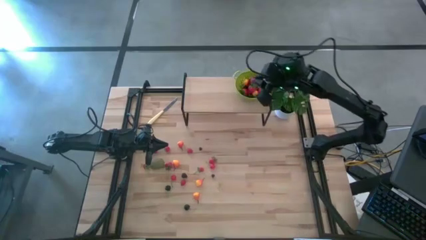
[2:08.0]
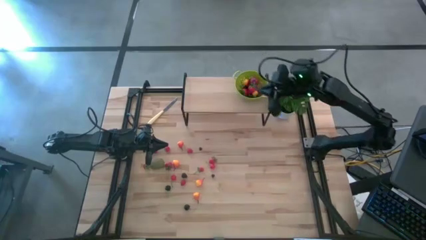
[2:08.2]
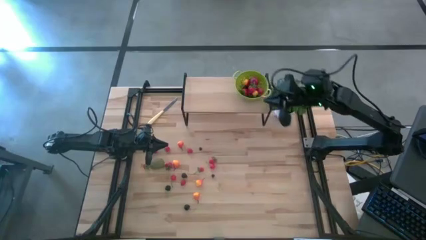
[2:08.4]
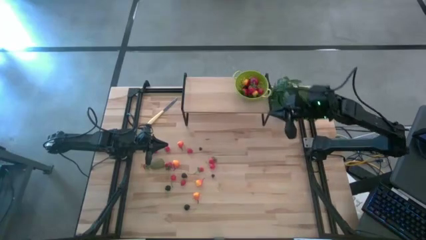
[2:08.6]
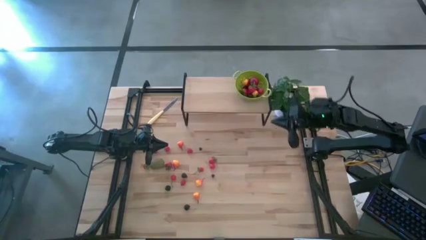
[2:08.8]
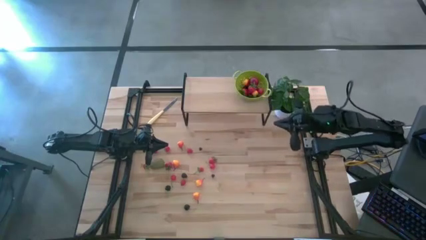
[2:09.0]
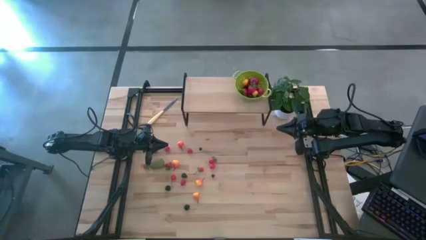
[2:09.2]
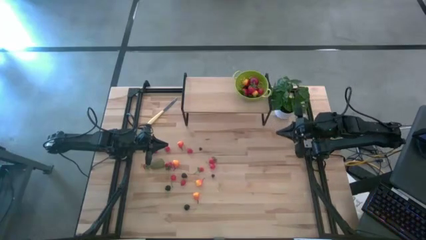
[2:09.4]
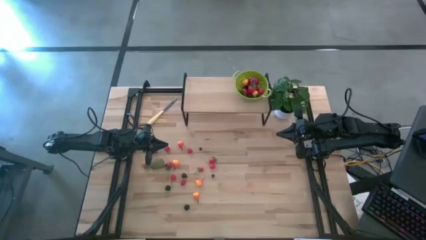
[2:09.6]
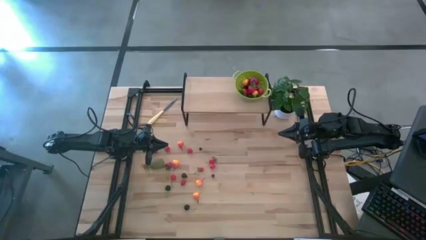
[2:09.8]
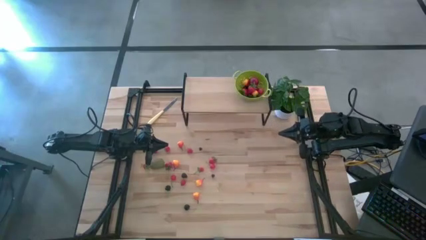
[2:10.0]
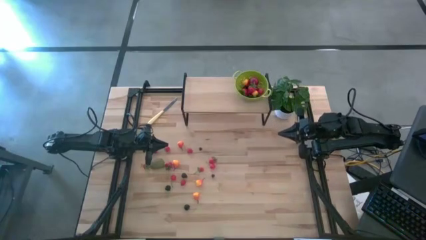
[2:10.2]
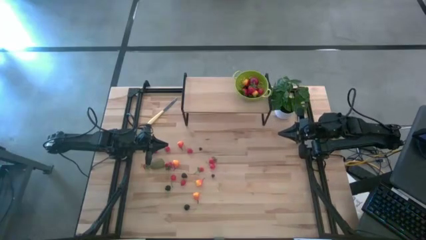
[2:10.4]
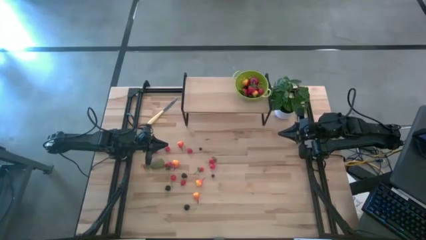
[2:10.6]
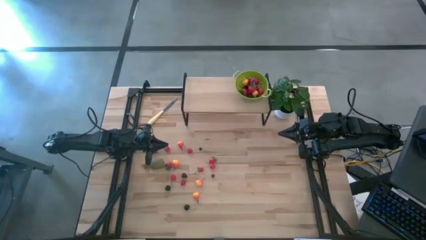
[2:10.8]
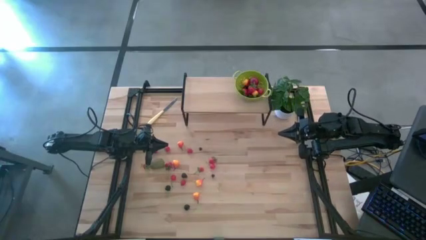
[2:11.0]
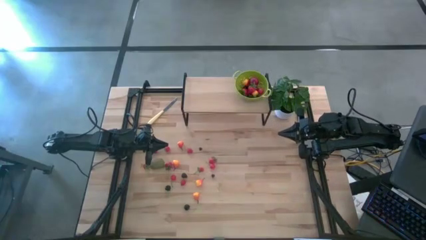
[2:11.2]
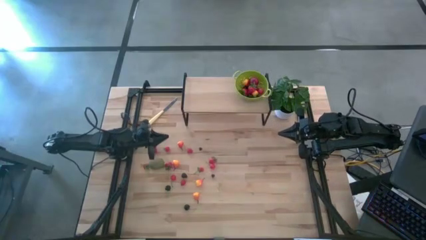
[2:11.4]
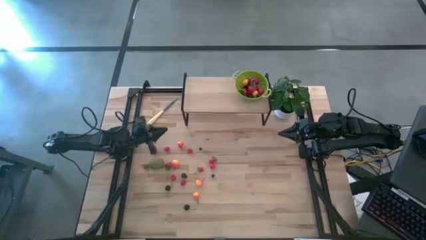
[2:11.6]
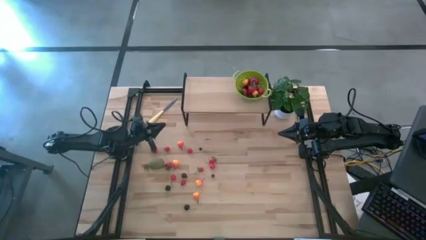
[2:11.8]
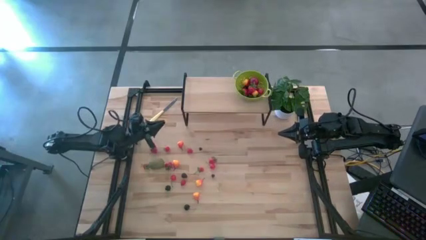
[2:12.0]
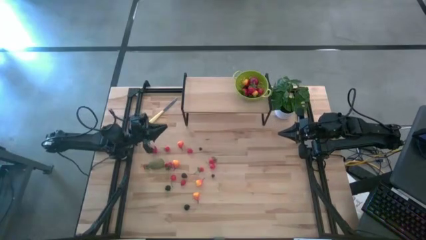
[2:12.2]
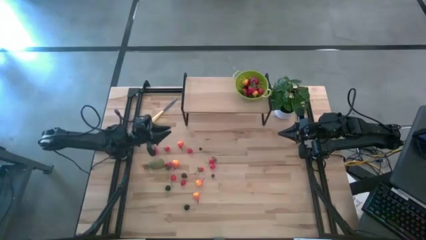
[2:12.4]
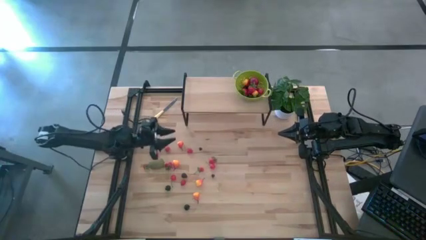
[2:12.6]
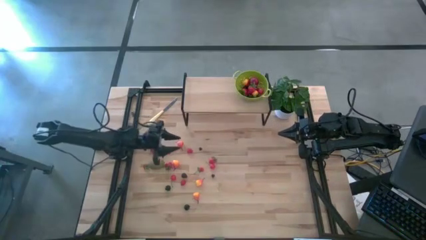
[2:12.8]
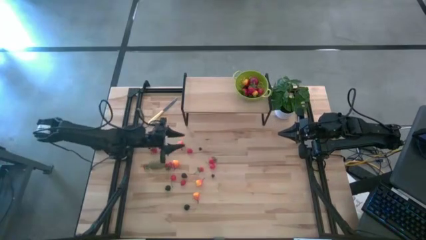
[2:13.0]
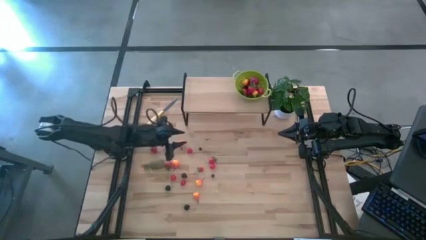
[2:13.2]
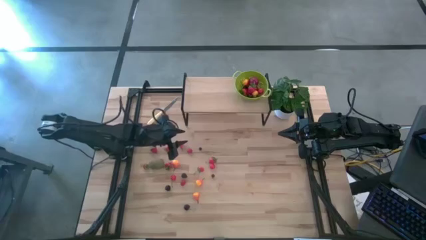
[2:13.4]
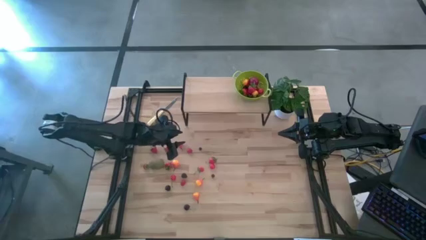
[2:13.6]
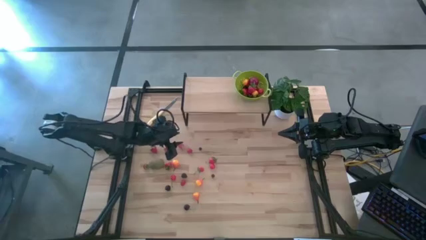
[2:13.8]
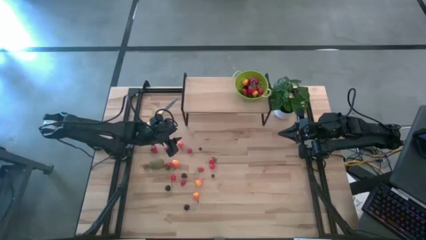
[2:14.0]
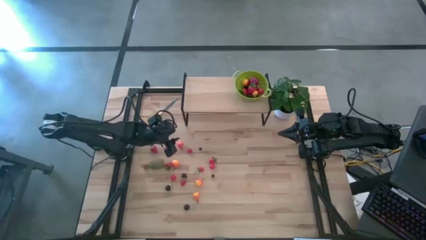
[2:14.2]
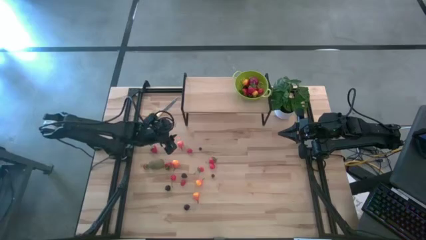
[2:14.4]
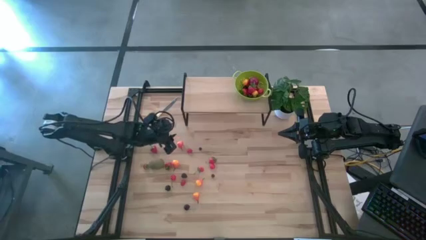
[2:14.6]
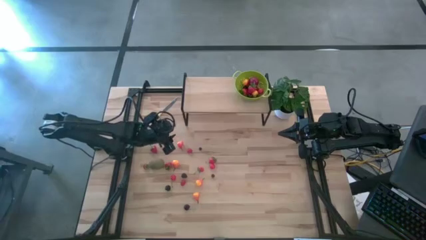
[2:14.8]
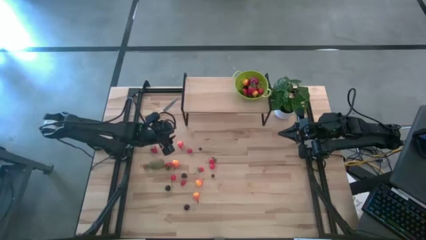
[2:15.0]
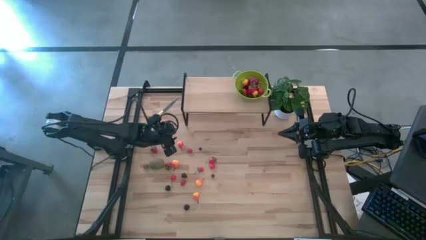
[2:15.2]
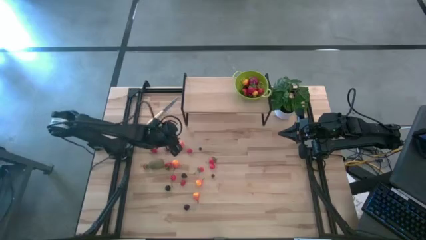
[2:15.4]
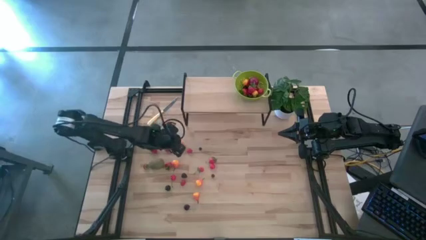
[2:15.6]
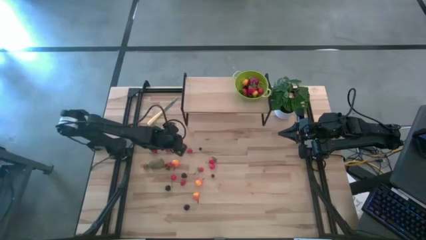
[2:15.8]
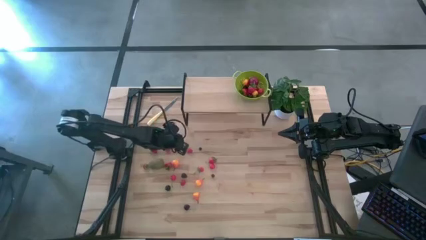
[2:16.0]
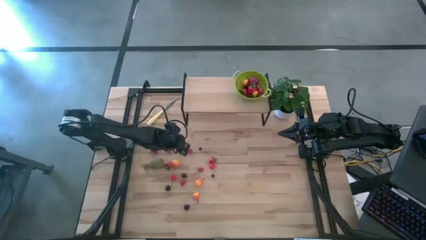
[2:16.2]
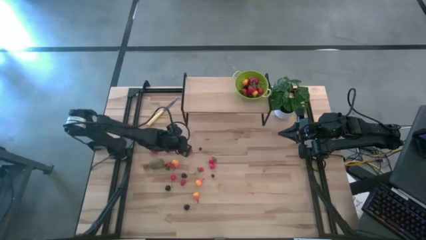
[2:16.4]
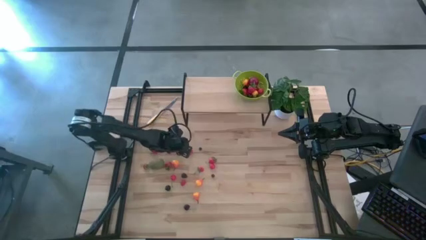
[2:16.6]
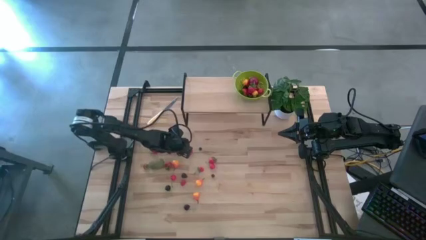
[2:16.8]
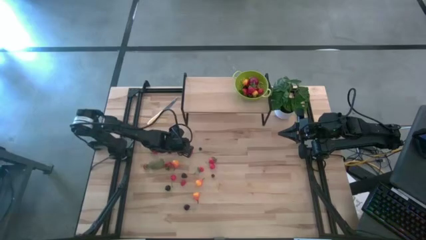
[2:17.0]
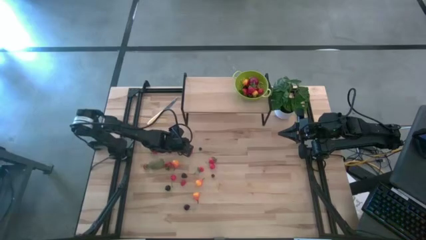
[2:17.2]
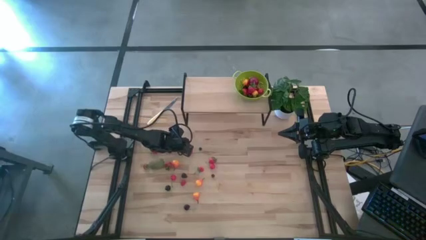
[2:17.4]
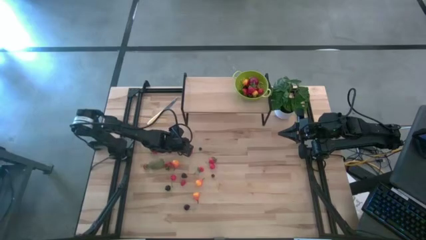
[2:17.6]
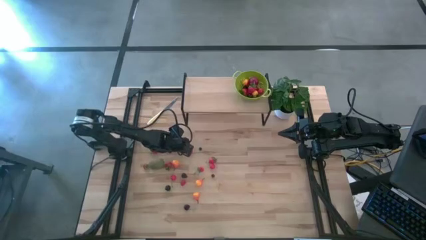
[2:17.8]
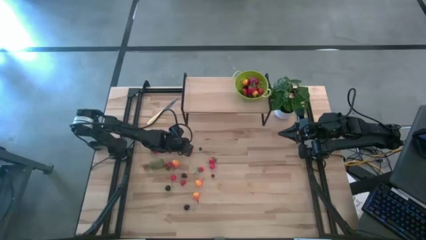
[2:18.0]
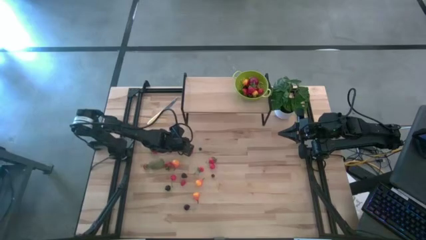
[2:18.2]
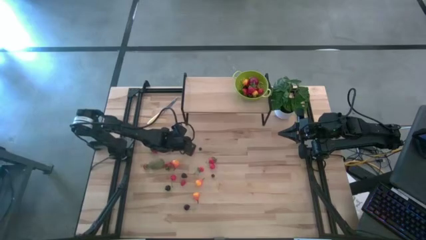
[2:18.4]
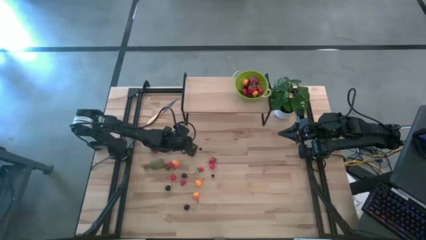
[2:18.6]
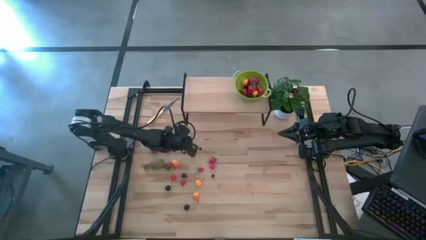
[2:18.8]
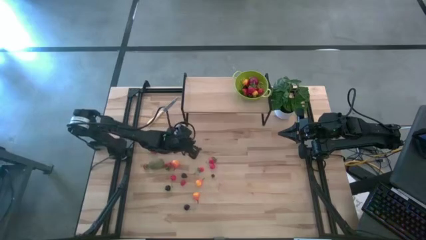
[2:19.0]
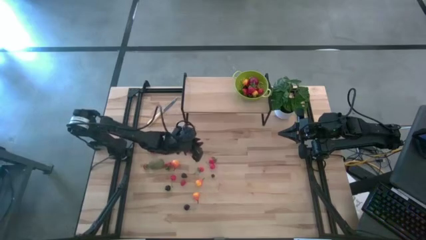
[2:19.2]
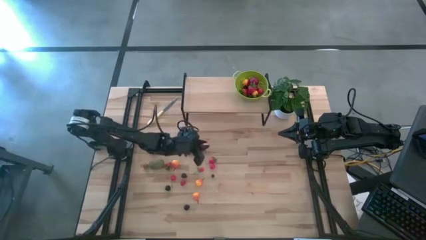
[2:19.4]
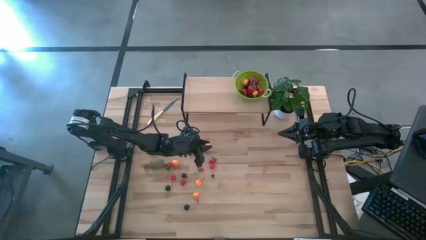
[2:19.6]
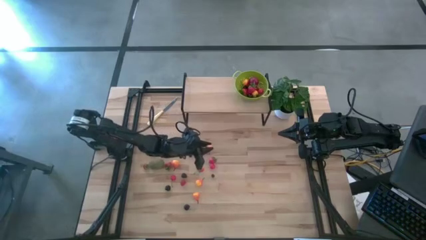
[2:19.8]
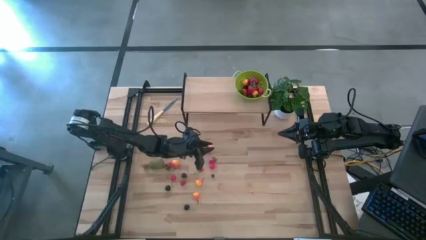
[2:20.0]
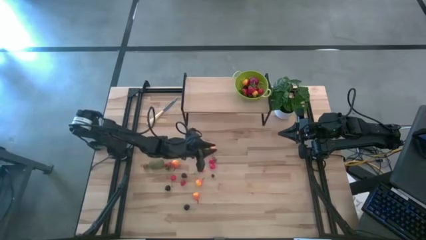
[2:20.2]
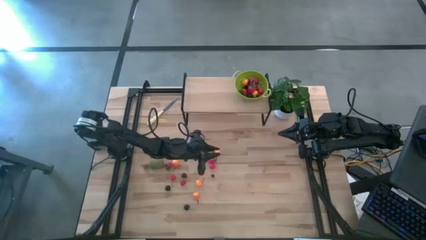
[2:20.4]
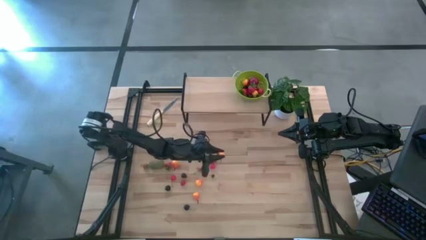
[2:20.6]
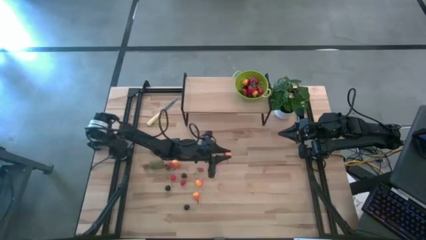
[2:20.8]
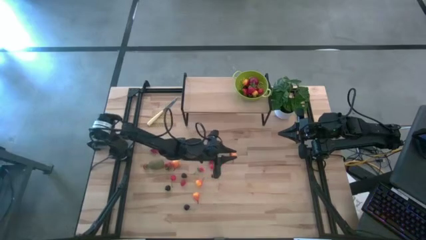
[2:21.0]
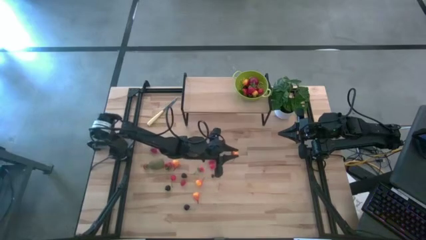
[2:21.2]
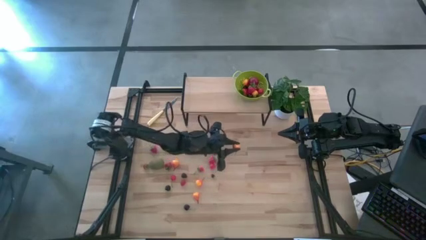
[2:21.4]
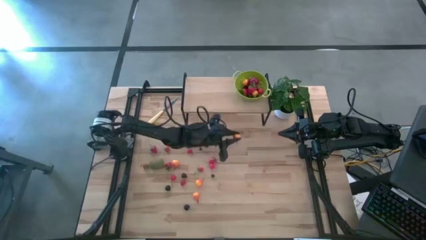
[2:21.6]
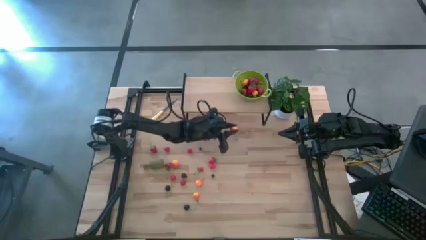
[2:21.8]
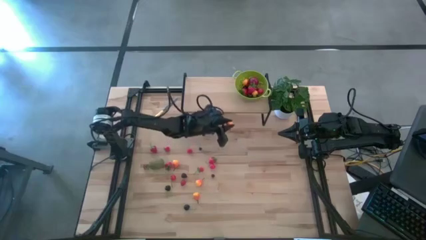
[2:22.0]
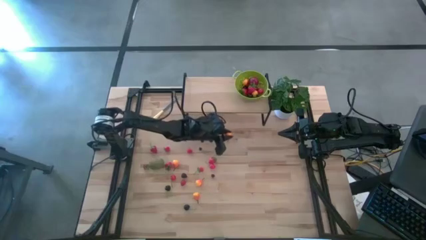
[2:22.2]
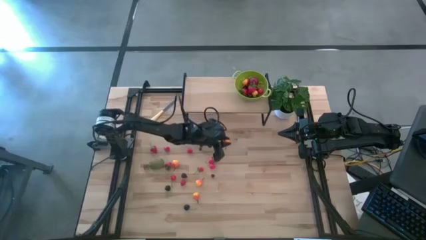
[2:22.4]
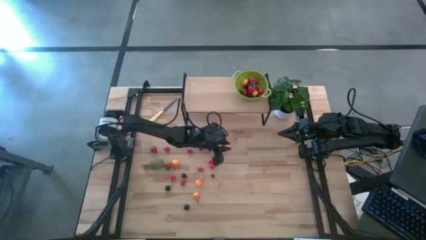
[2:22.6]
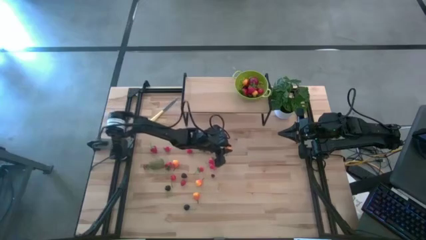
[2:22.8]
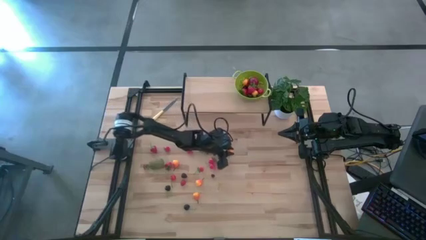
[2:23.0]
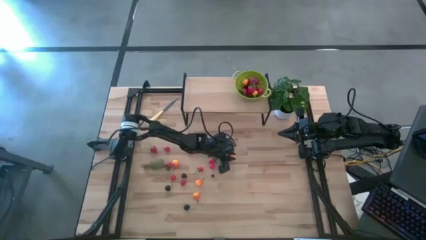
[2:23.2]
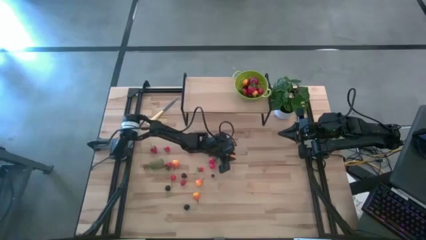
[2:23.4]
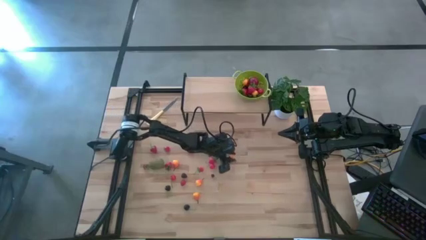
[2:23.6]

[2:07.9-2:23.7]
Task: Build produce basket
Move the pear to the center of the table
